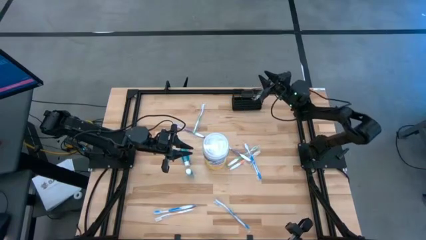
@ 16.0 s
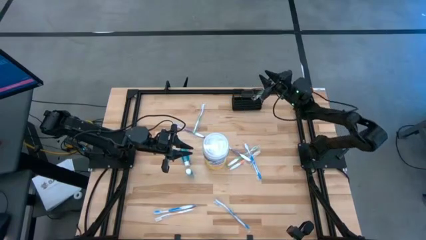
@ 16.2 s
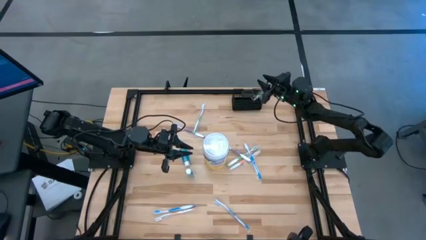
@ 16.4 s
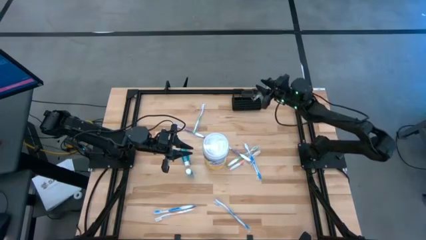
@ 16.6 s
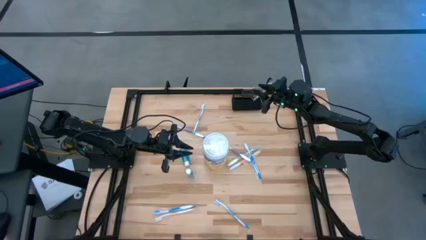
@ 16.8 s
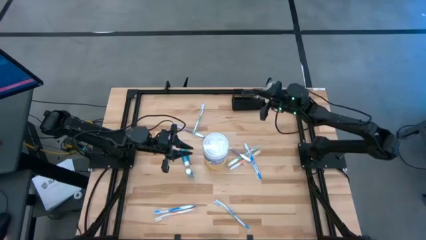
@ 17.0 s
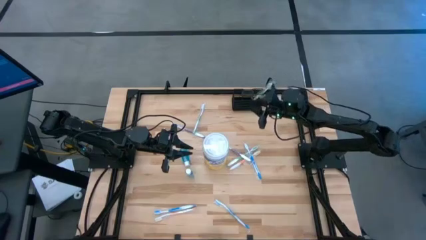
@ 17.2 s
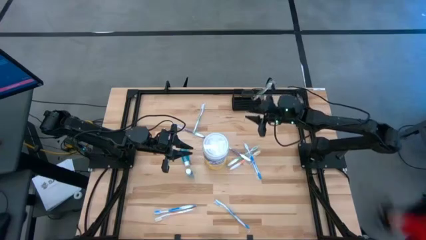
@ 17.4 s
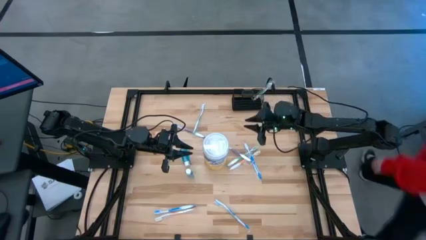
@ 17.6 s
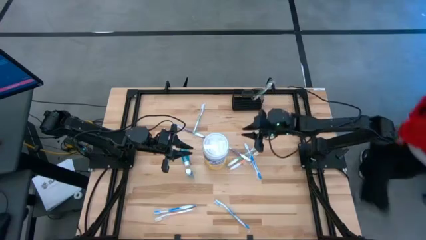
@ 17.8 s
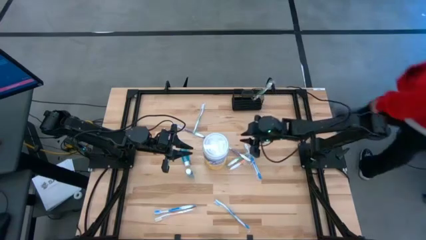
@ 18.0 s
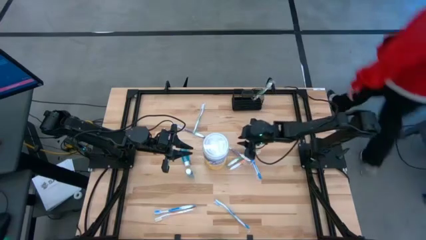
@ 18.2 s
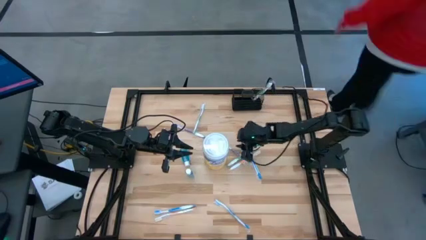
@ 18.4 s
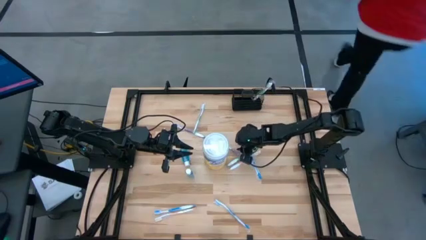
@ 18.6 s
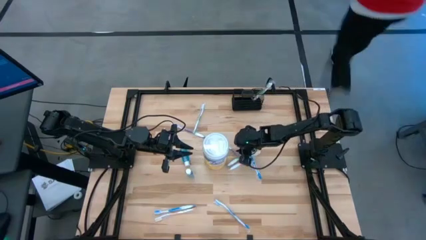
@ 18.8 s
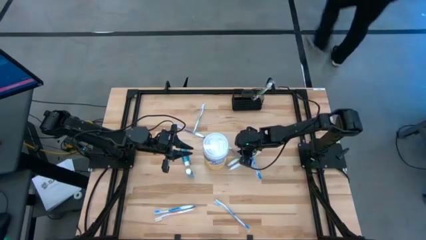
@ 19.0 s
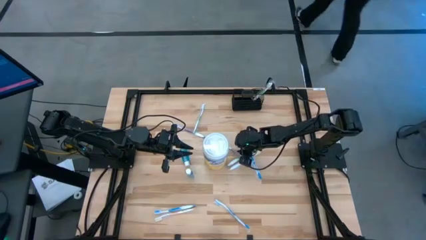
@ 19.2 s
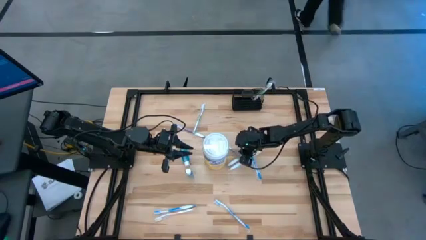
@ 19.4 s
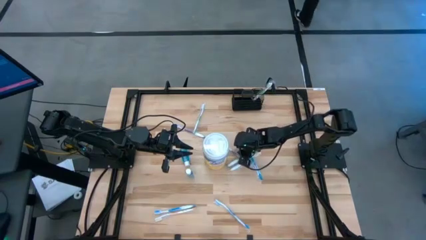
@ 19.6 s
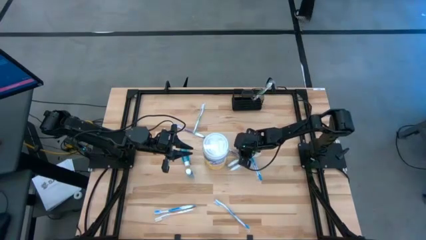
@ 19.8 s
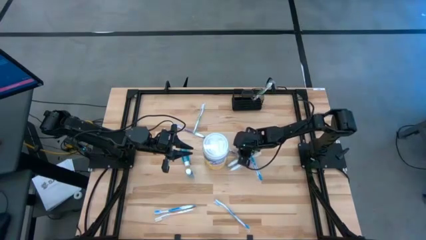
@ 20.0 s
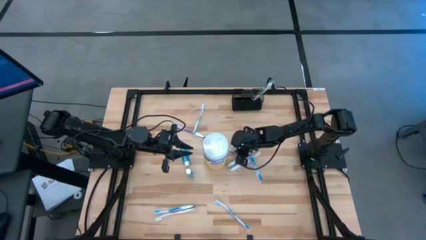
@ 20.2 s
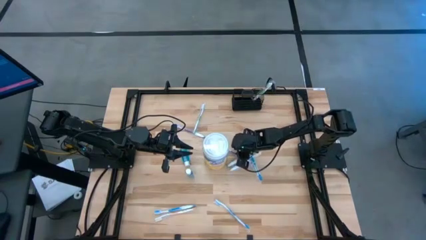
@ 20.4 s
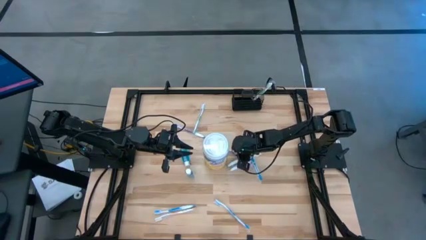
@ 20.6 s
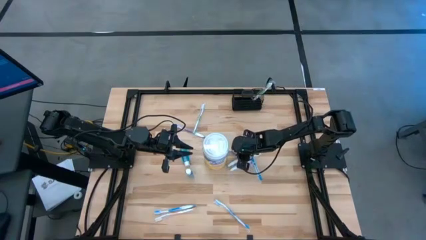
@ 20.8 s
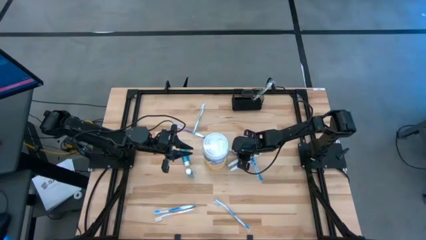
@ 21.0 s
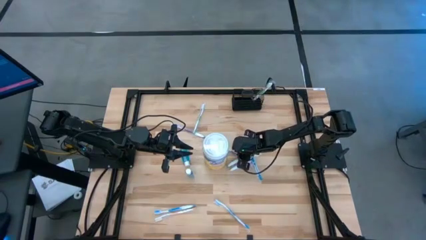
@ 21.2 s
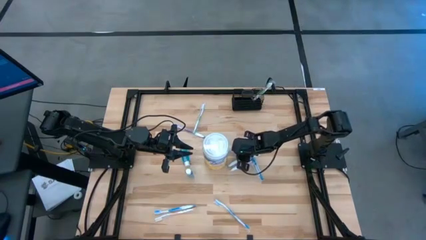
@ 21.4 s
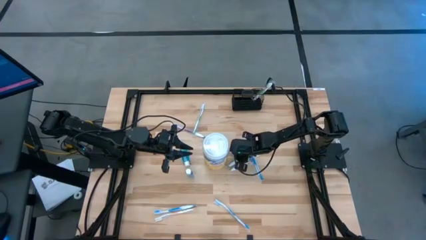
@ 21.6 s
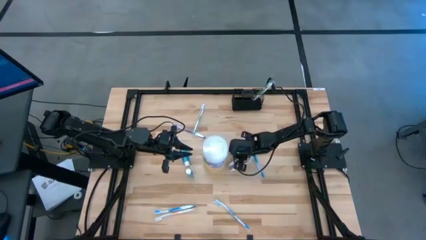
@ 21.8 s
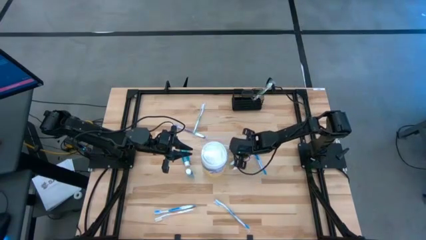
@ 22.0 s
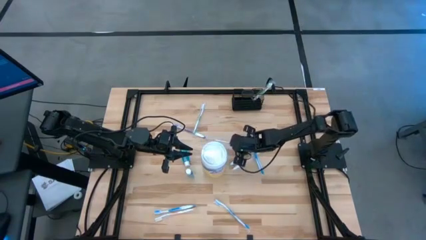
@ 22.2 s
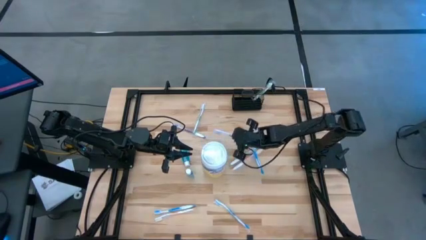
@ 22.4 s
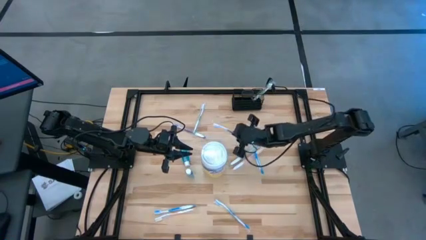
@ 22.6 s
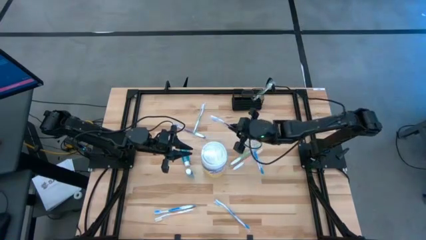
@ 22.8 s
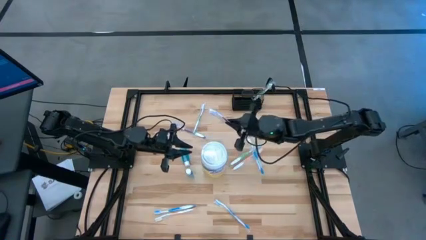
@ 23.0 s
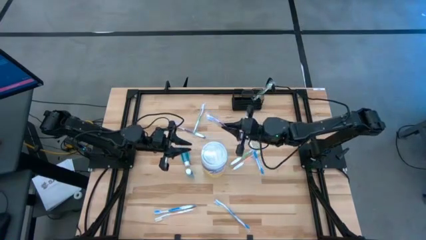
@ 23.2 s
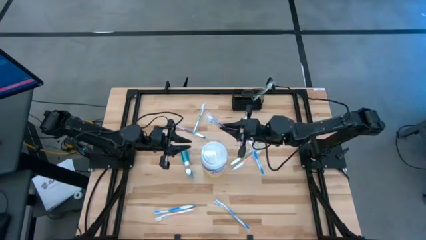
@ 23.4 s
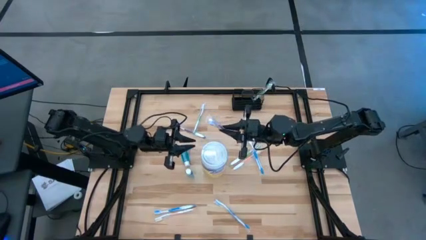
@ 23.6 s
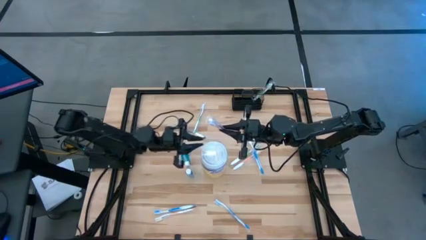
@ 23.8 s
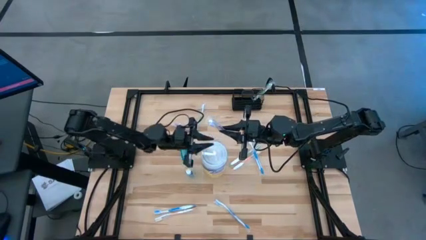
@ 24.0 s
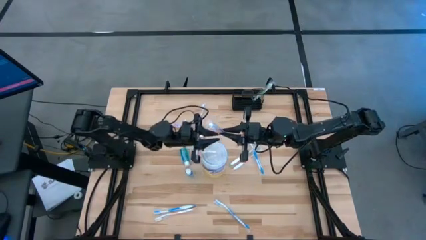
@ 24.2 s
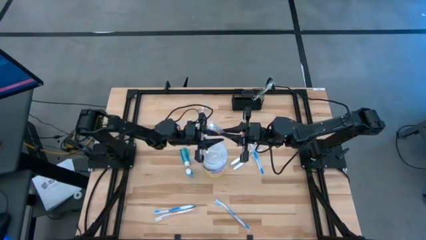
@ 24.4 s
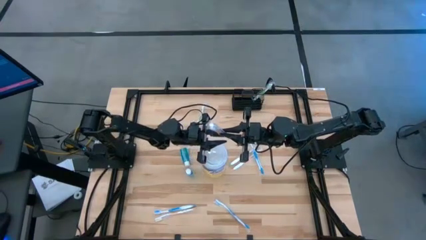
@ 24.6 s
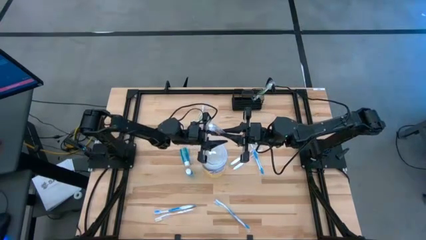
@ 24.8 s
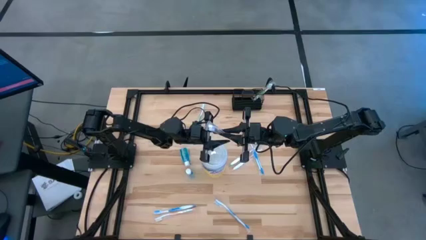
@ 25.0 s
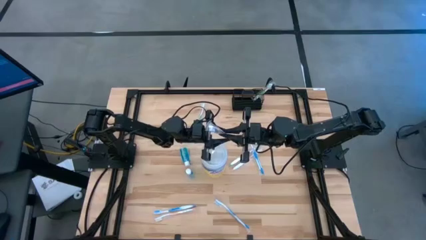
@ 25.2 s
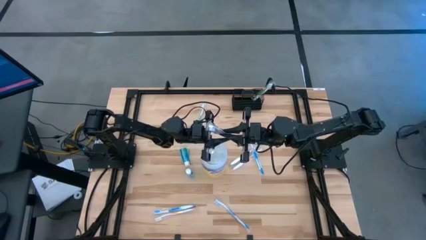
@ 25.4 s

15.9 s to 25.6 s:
Task: Pick & Place toothbrushing station
Put the right purple toothbrush into the black mesh organizer

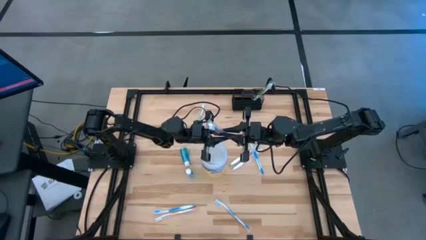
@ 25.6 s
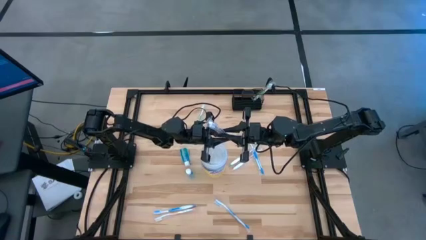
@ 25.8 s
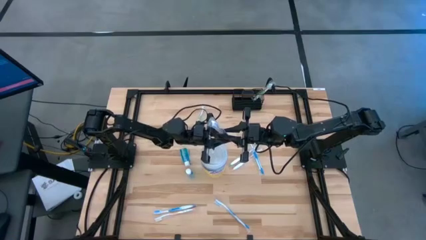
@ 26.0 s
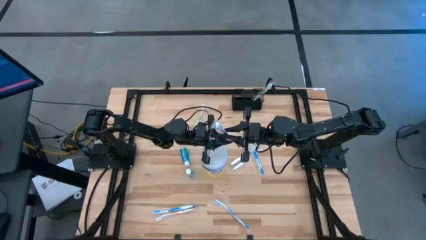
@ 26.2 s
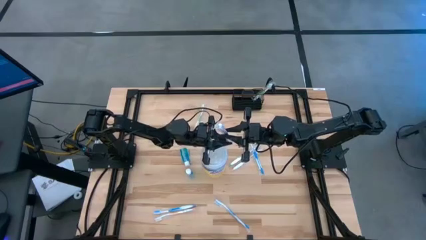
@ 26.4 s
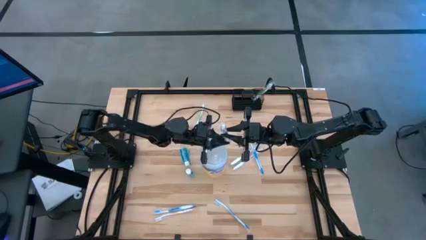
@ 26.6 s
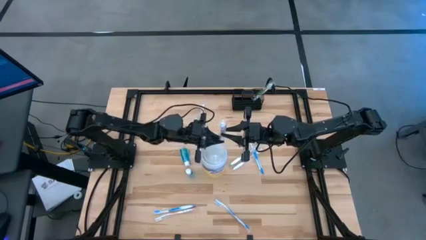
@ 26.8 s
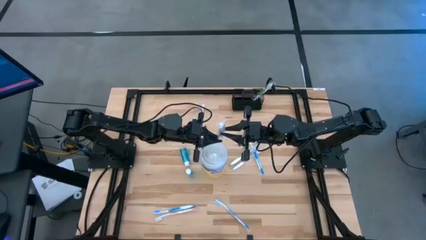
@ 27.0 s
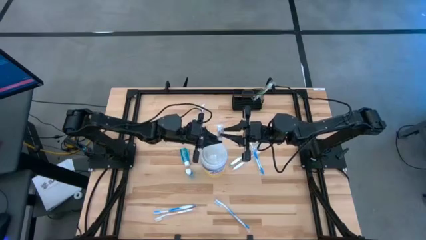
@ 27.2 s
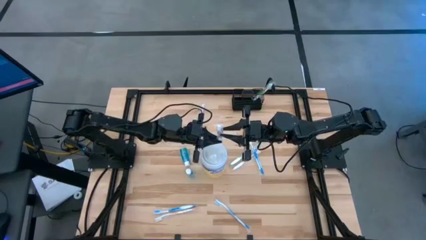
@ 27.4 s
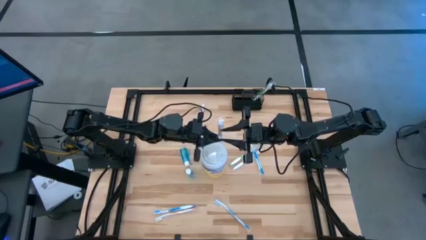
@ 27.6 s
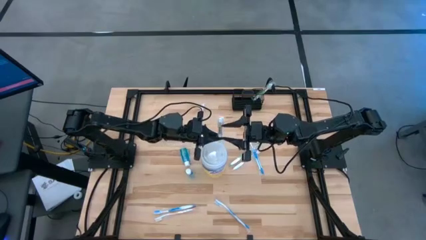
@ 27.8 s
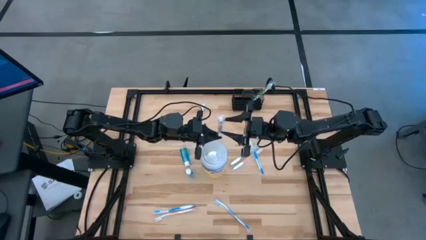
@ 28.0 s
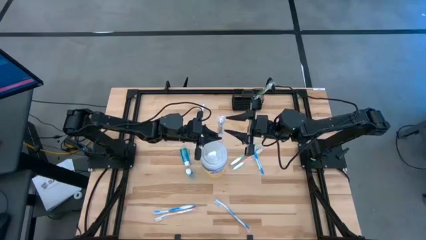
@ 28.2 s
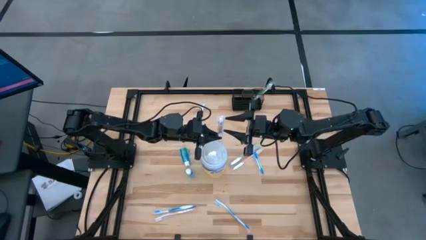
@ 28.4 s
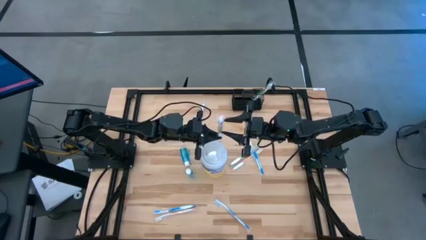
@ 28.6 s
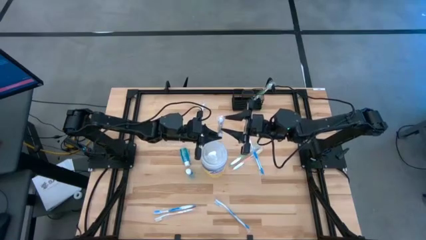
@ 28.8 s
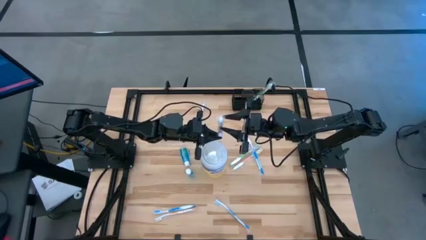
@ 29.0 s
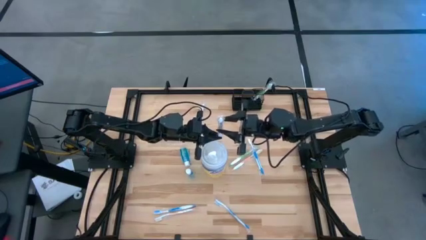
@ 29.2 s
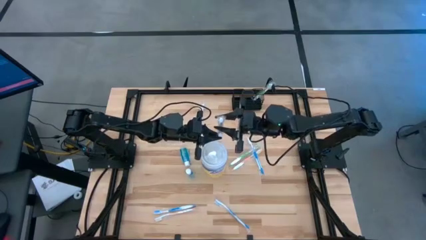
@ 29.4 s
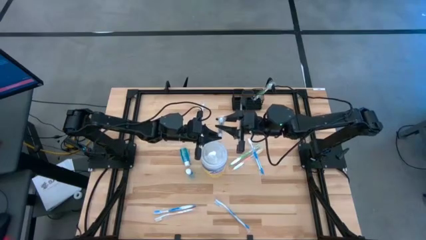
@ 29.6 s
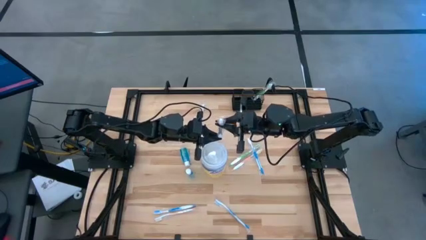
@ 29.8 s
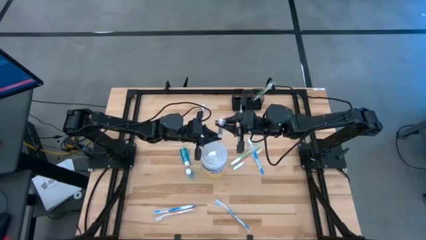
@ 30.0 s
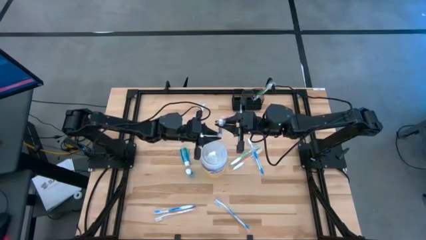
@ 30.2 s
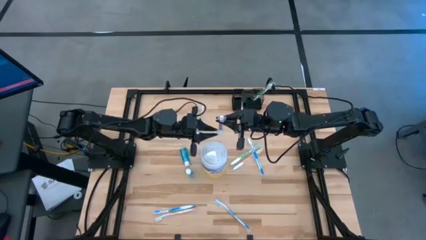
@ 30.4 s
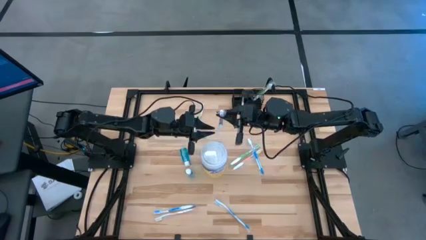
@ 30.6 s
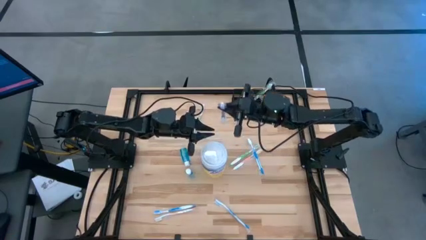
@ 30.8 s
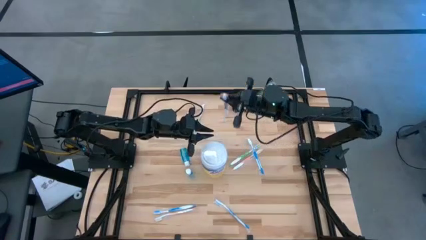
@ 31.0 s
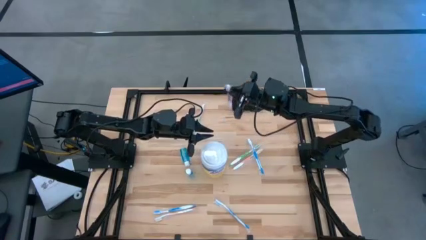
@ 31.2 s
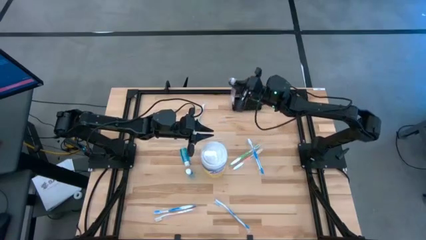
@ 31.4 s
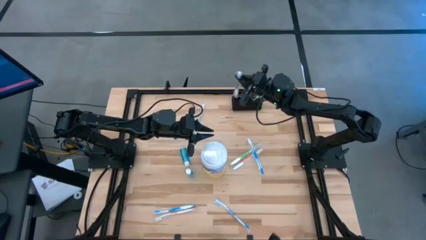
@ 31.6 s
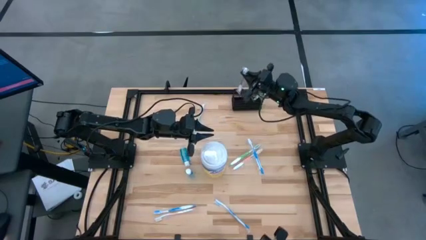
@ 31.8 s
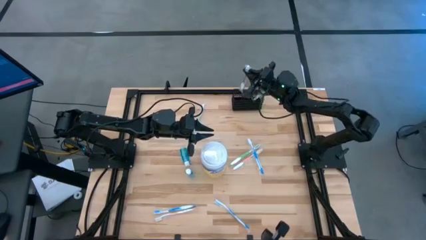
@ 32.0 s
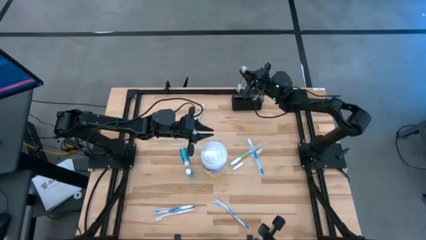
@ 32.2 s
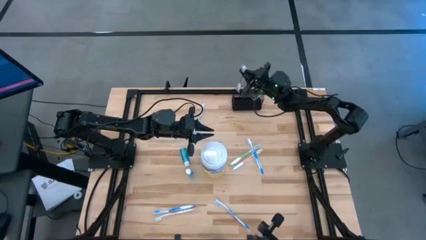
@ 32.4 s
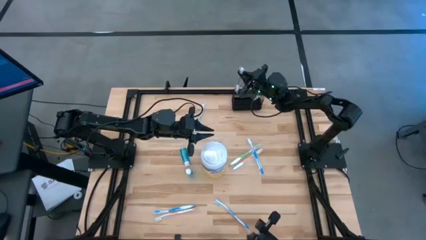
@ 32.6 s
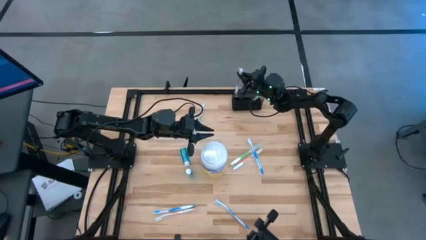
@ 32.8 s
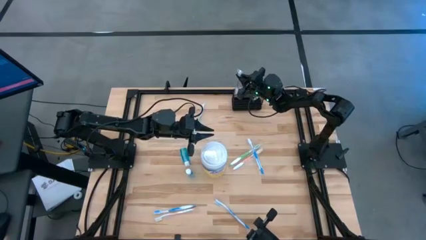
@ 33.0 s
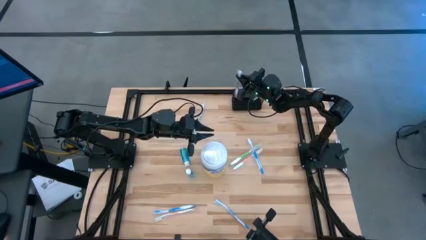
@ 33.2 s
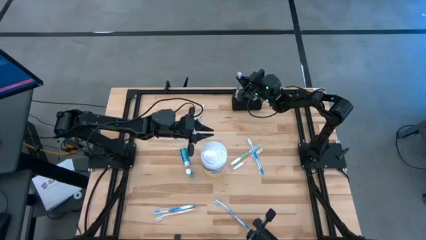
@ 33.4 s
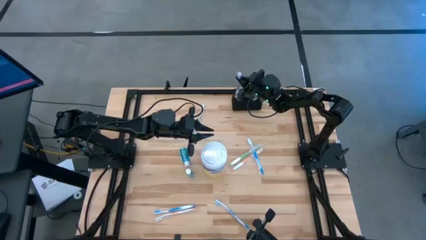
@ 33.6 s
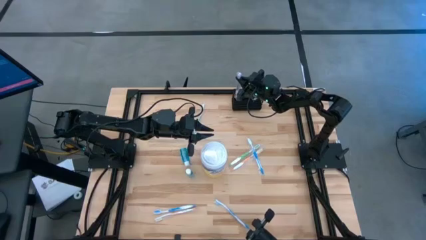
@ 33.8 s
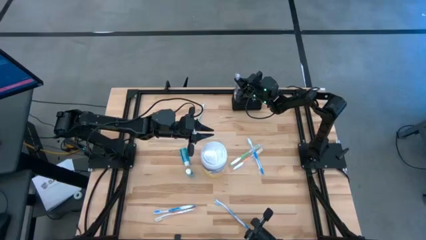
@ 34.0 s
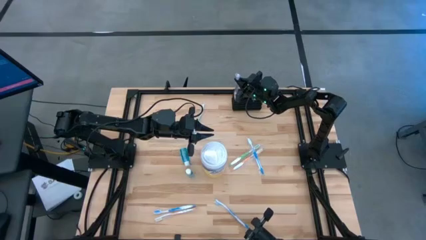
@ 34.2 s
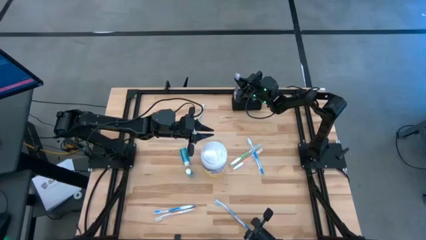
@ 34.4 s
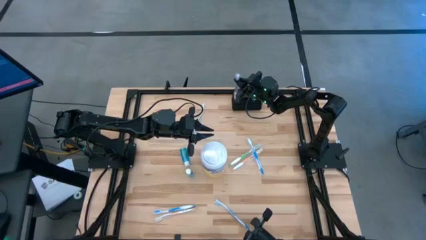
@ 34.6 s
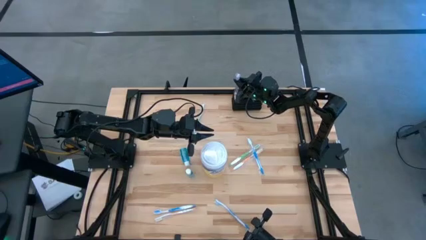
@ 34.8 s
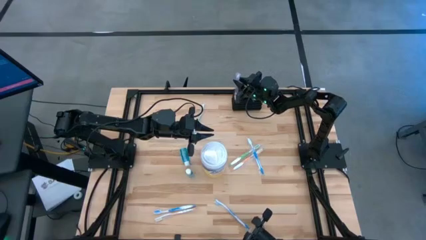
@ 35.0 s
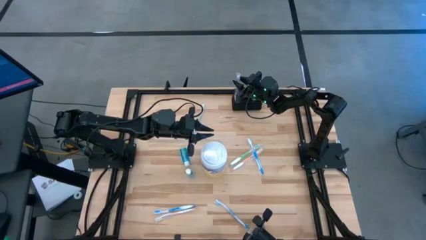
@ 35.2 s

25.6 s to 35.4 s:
Put the right purple toothbrush into the black mesh organizer
